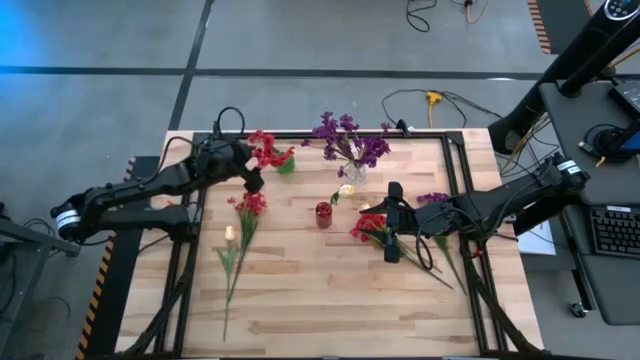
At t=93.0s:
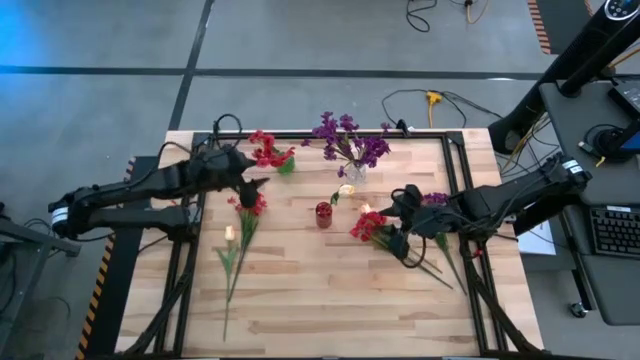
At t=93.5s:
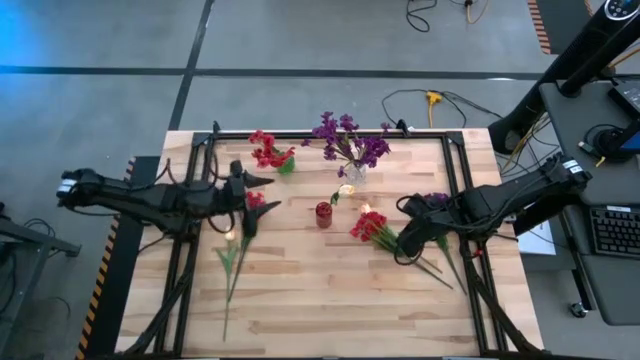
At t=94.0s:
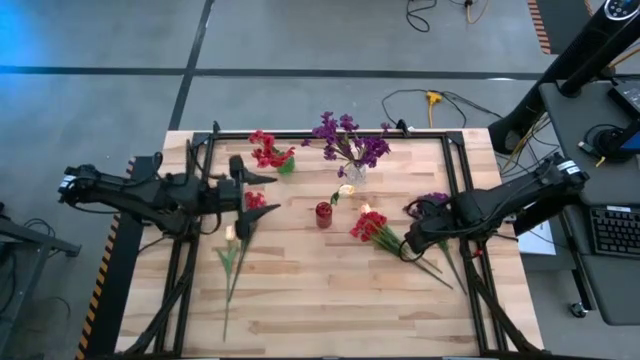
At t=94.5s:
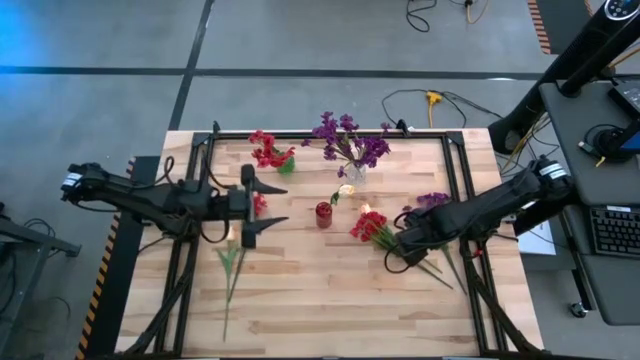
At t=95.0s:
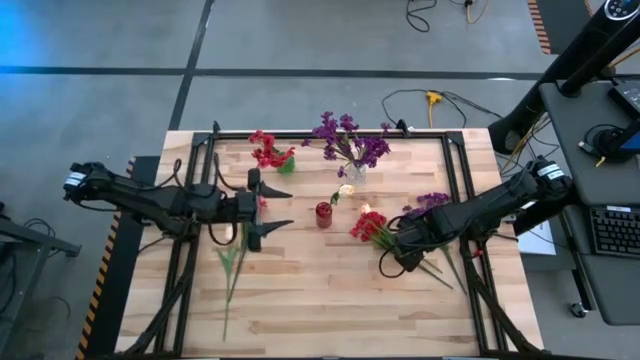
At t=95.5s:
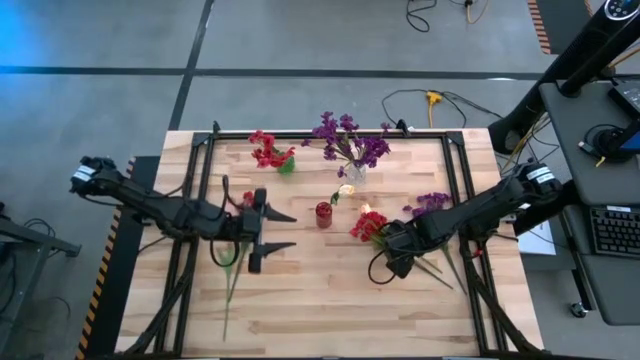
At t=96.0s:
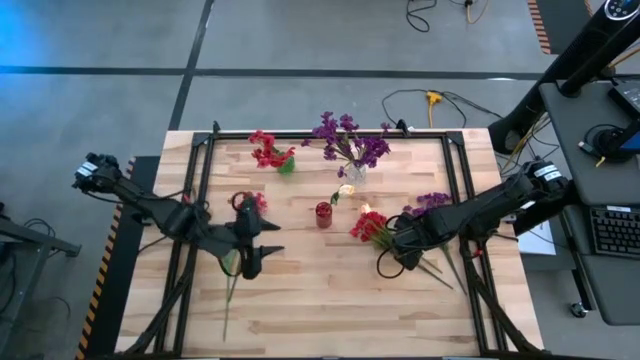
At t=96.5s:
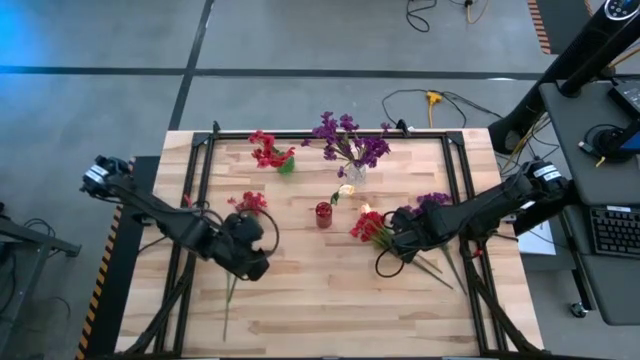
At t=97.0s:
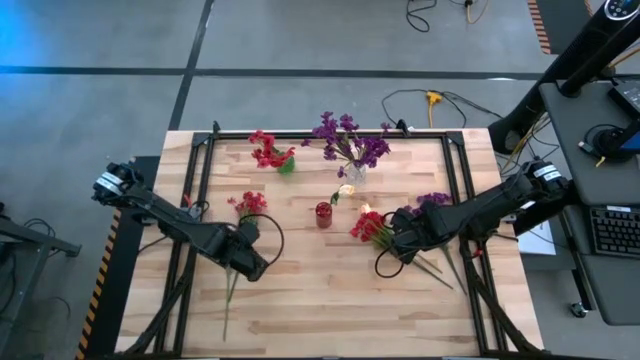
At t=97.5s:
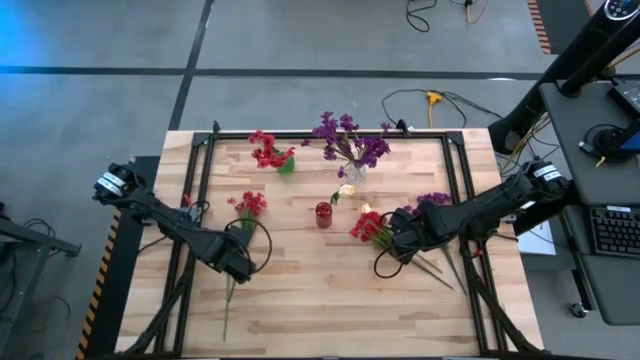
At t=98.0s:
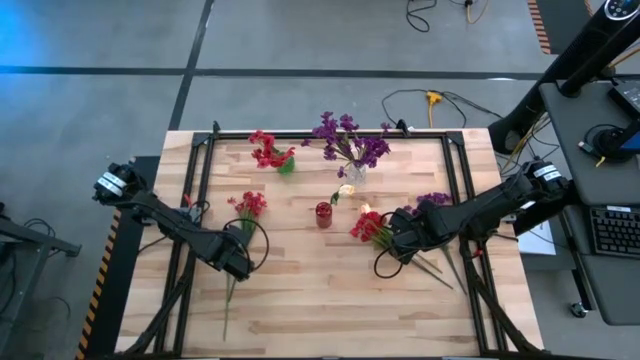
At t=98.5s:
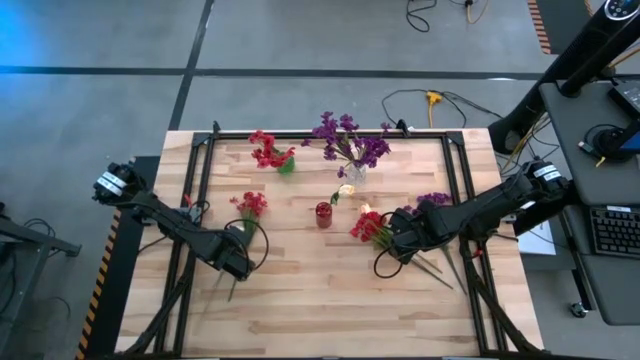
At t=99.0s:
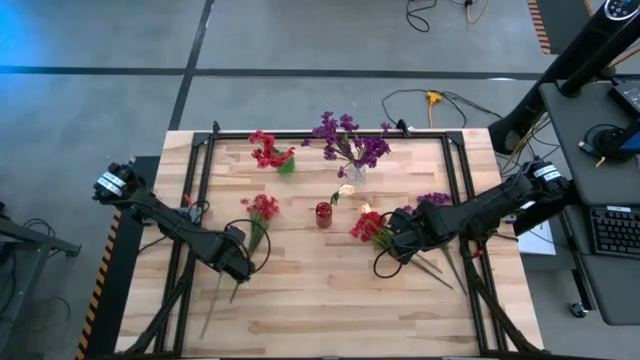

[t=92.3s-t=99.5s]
Task: Sort flowers into vase by color
Put the yellow tulip into the red vase

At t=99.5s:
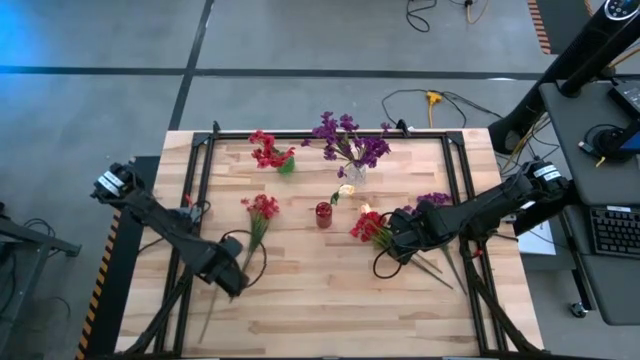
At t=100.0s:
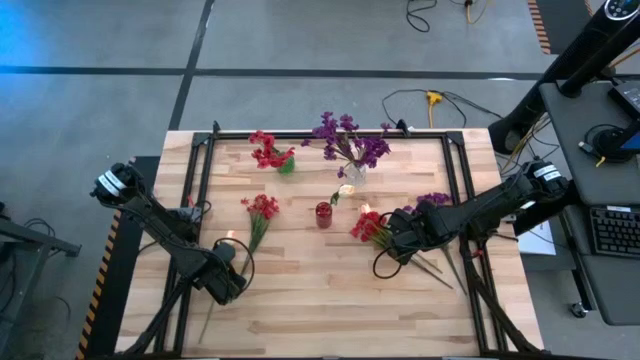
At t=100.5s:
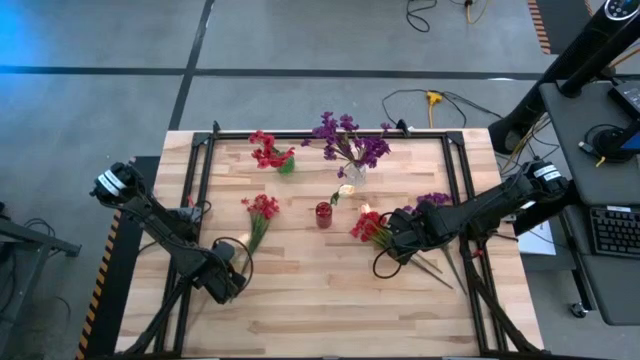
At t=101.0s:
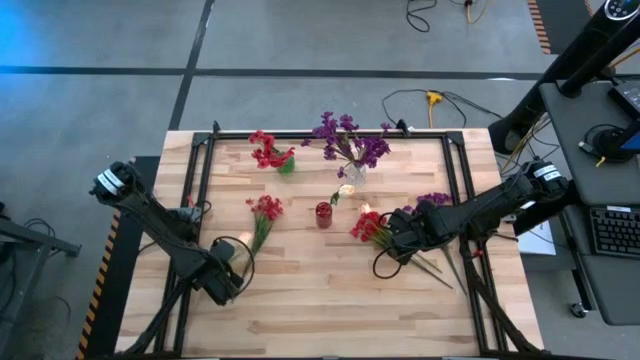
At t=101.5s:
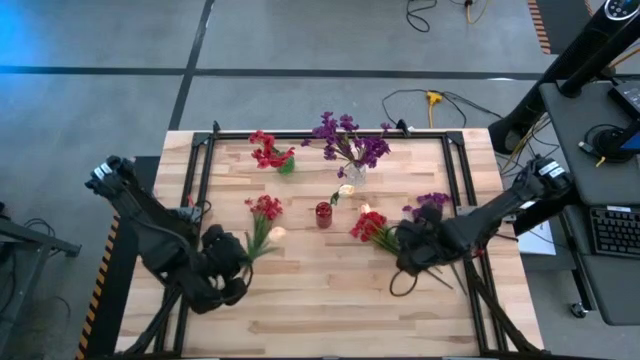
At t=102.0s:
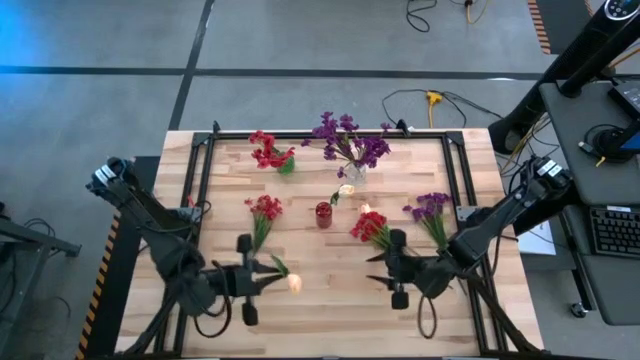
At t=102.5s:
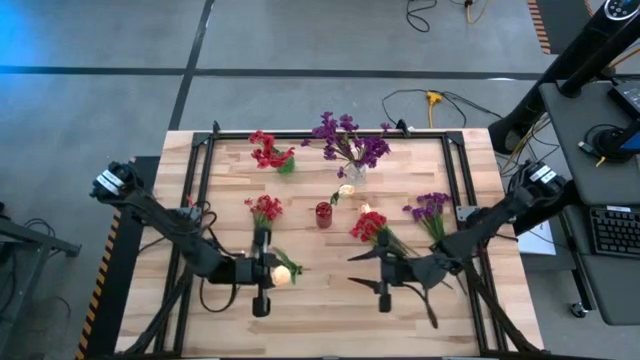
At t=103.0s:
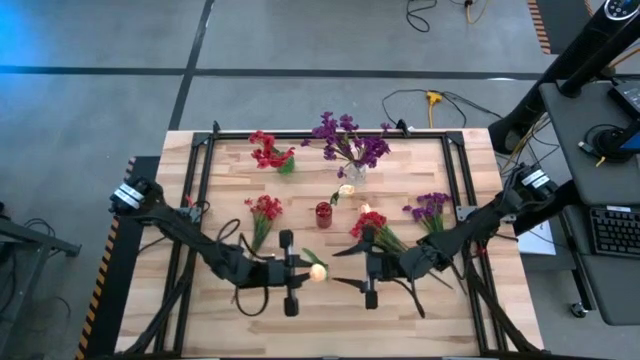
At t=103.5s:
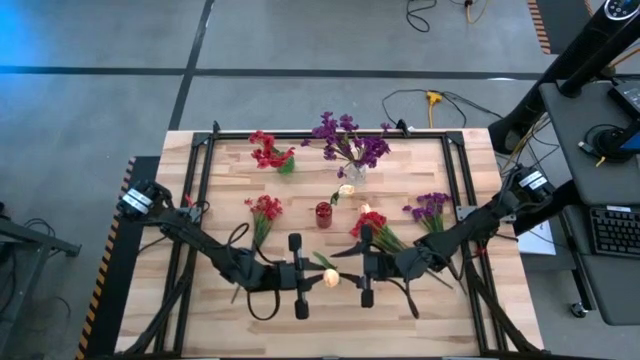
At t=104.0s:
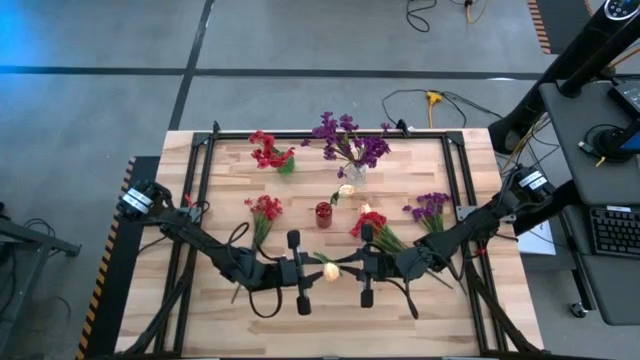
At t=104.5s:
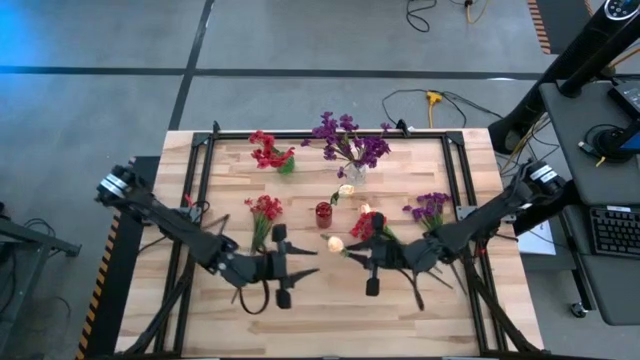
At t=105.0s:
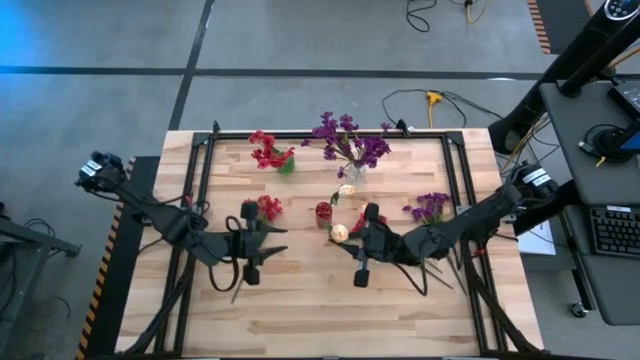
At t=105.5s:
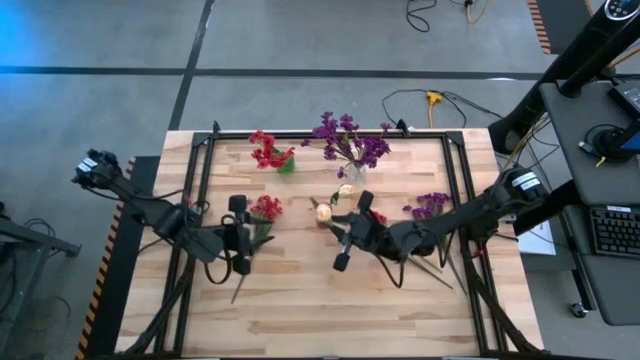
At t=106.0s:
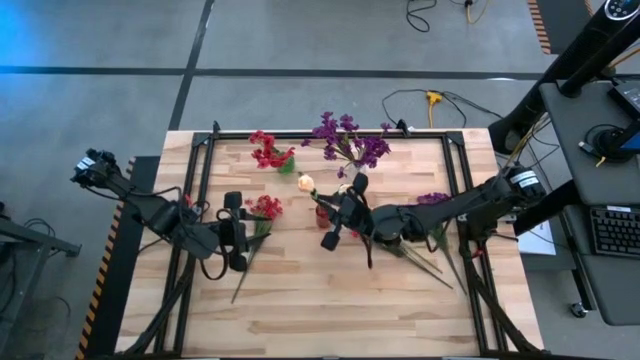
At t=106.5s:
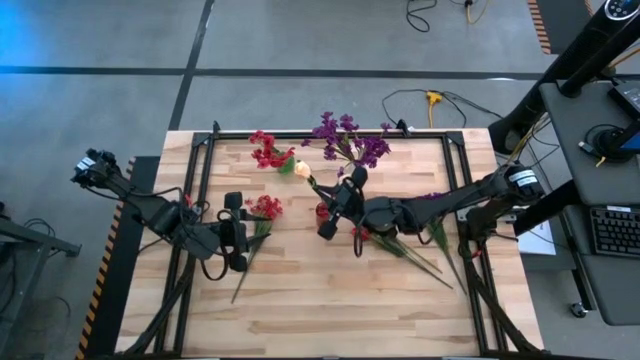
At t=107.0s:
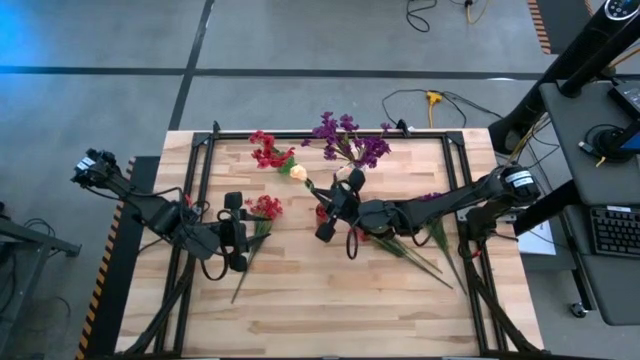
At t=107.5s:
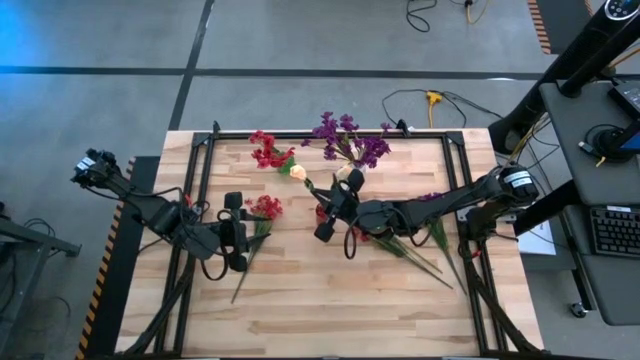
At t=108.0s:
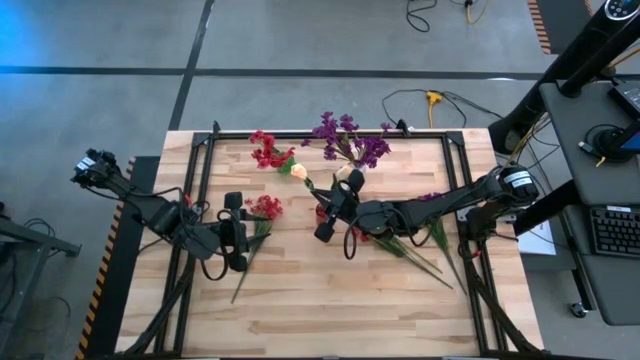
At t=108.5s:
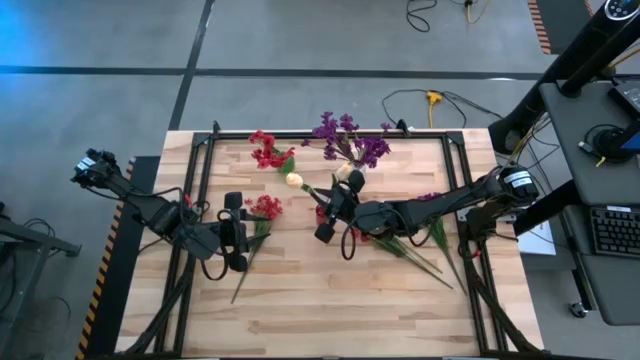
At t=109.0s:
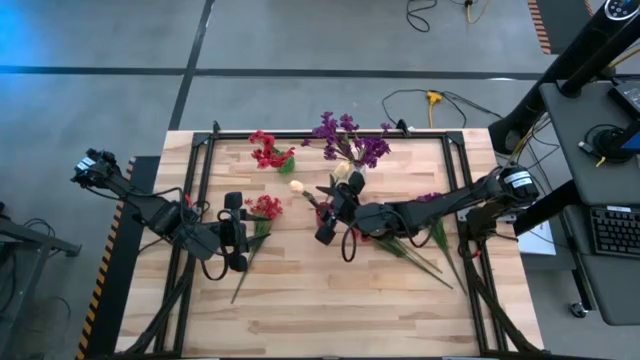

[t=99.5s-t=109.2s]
Put the yellow tulip into the red vase

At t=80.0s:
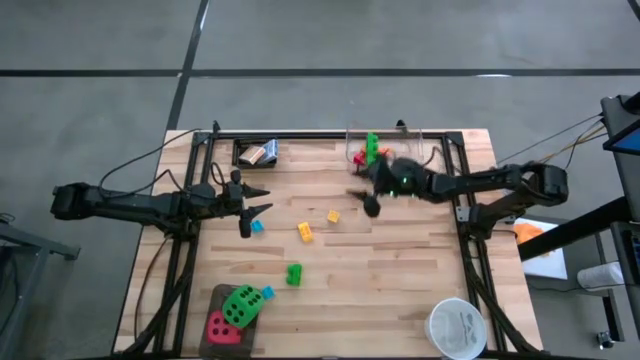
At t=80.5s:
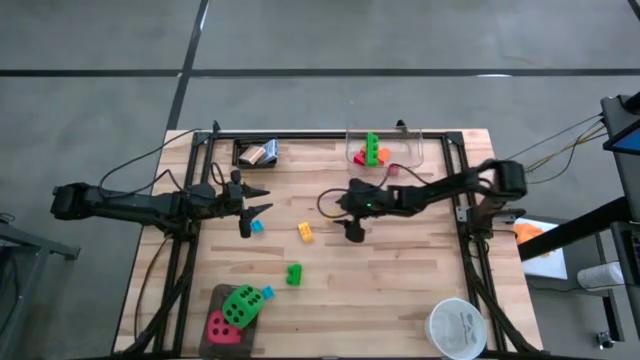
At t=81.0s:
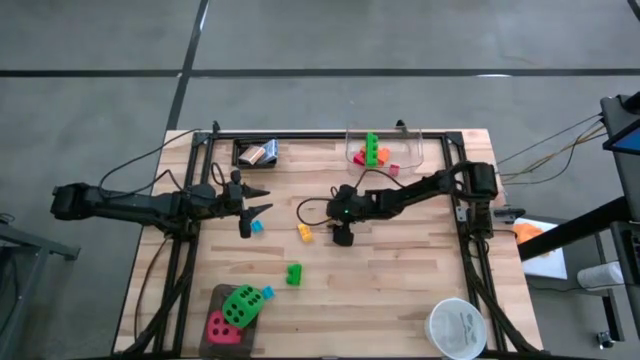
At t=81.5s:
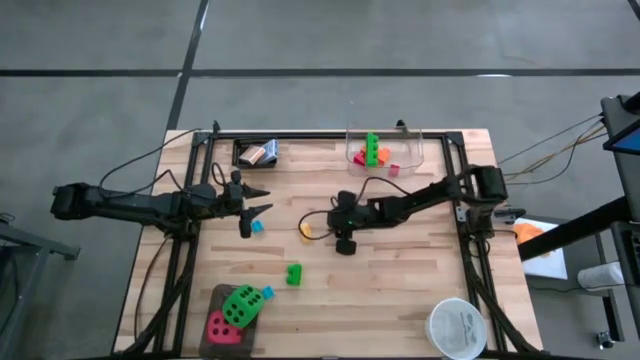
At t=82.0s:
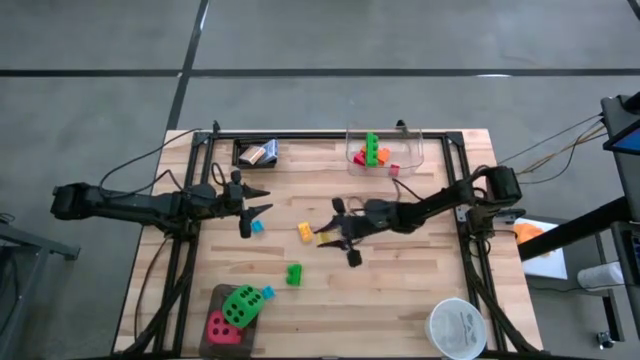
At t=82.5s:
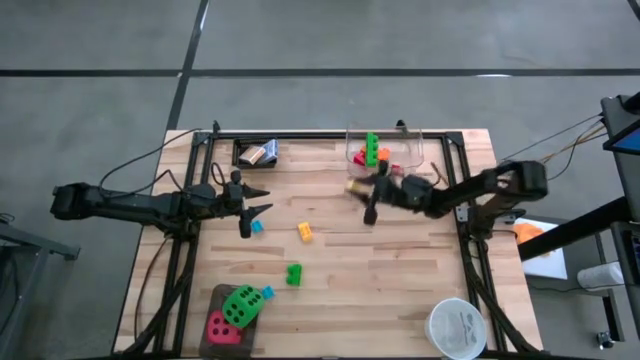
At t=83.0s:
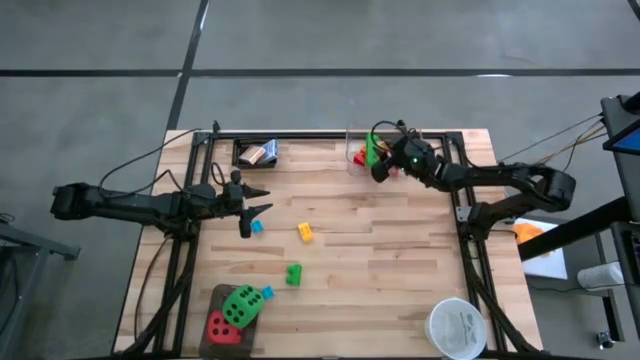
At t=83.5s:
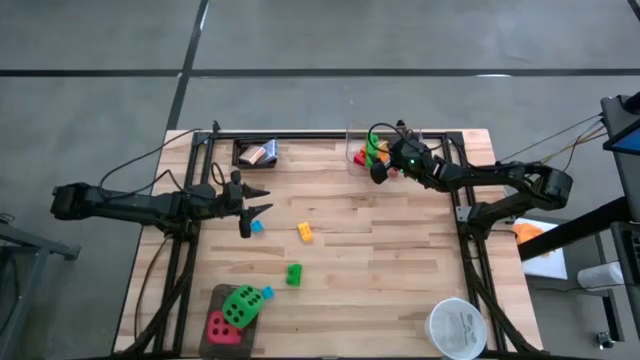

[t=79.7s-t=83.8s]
Task: Pick & Place Toys
Put the right yellow game piece into the transparent bin
